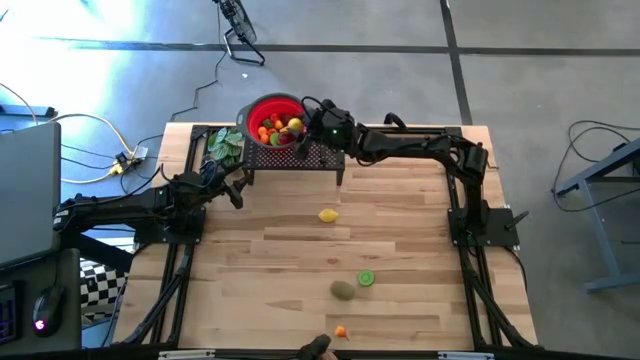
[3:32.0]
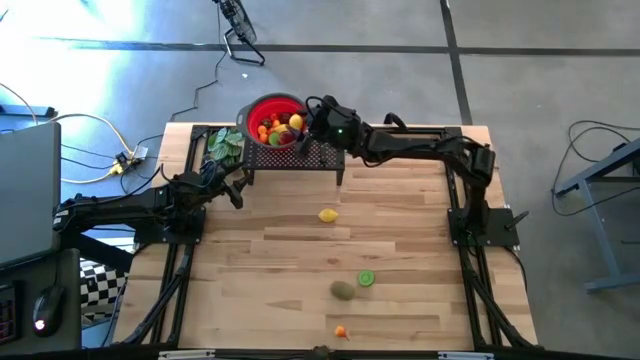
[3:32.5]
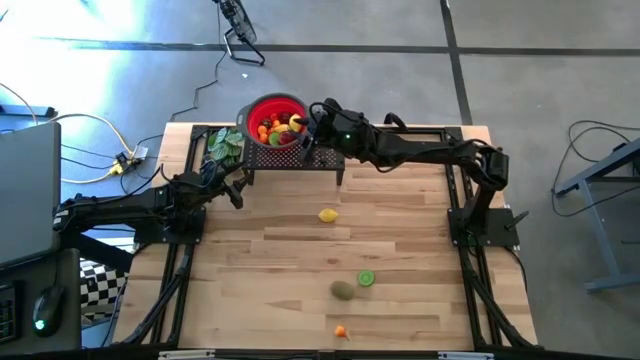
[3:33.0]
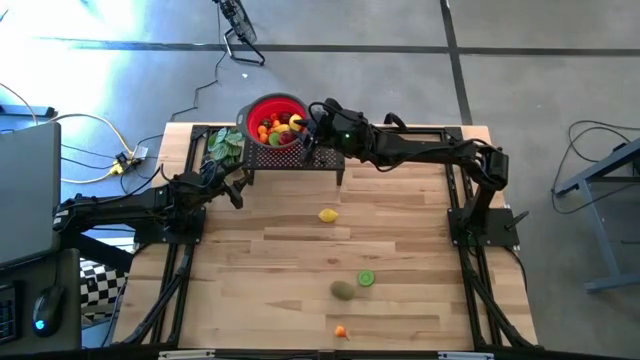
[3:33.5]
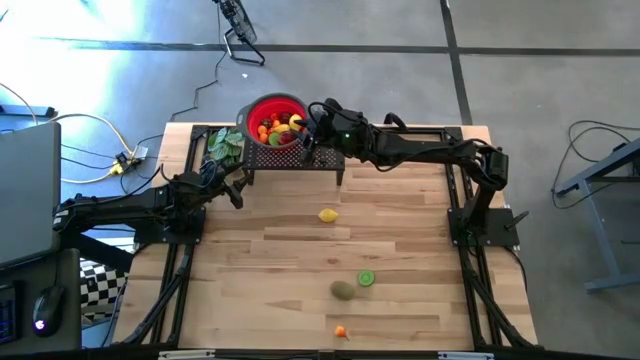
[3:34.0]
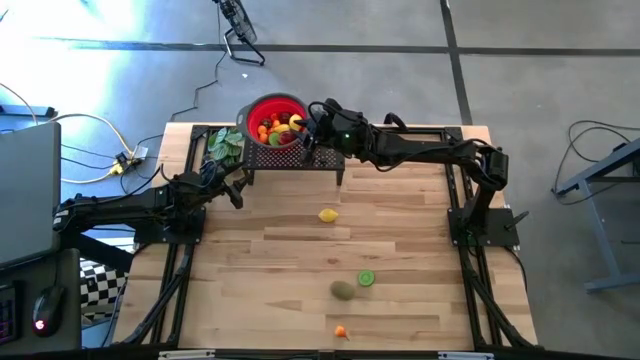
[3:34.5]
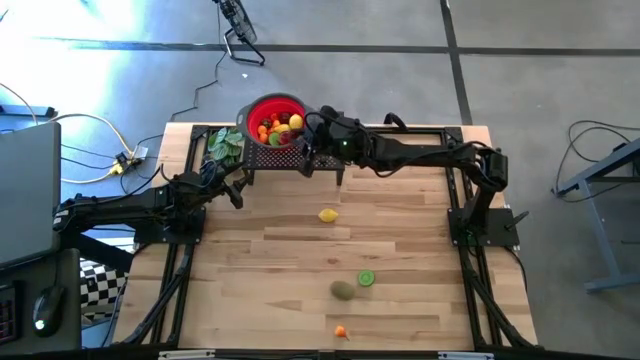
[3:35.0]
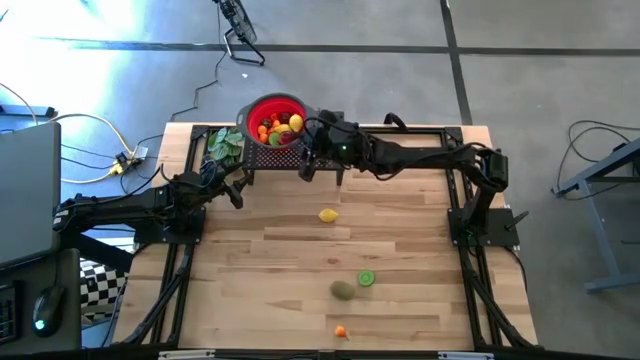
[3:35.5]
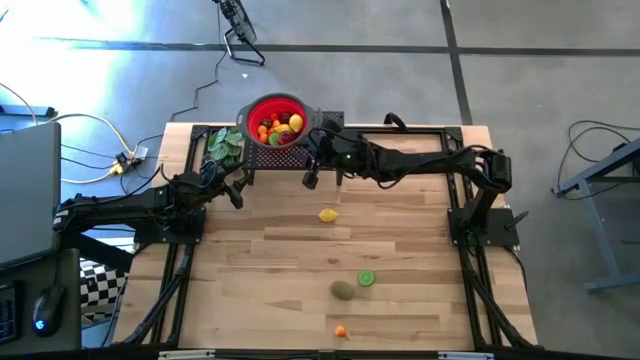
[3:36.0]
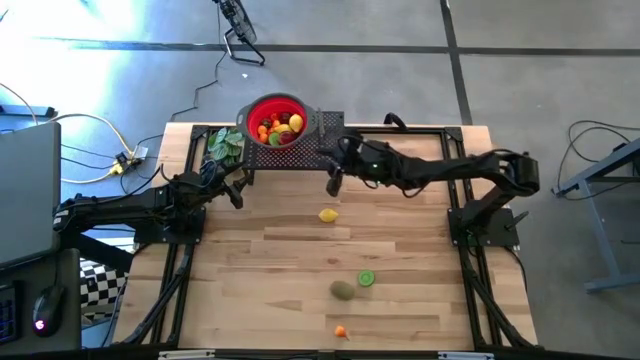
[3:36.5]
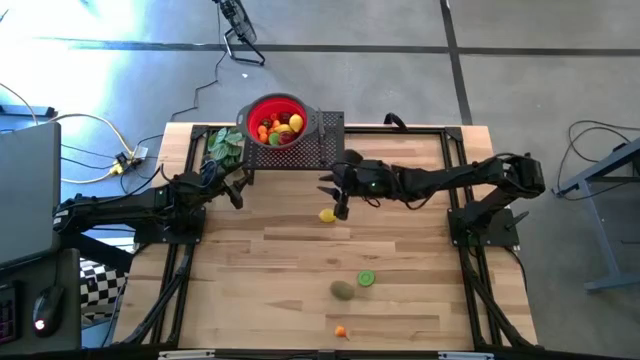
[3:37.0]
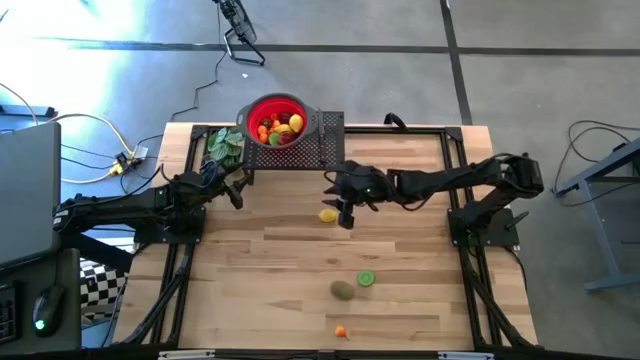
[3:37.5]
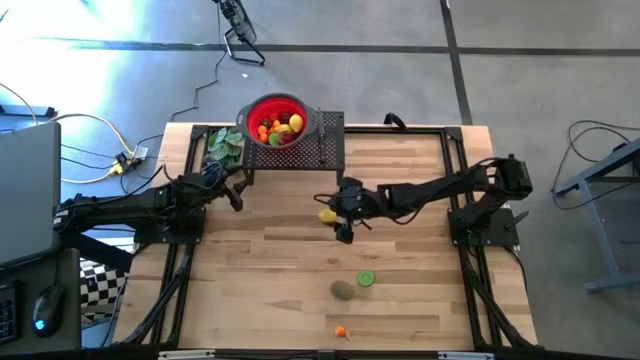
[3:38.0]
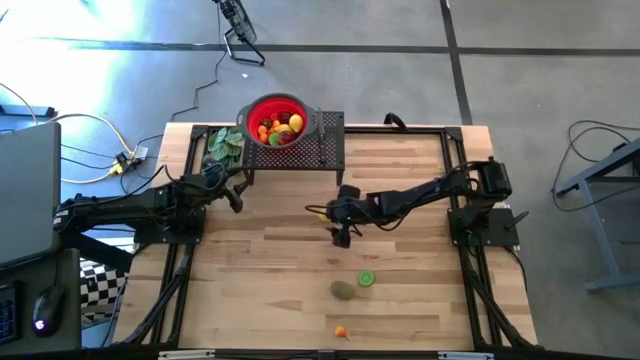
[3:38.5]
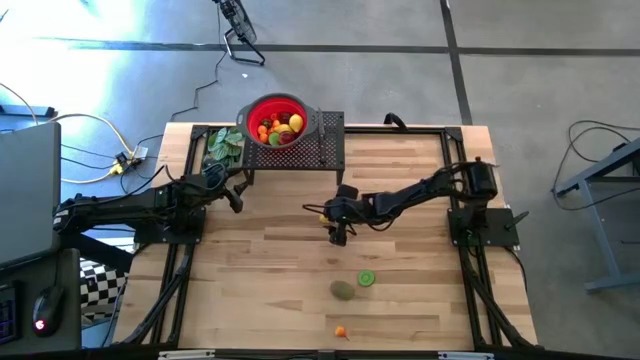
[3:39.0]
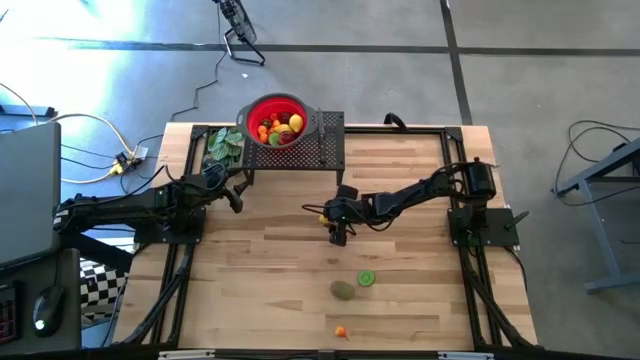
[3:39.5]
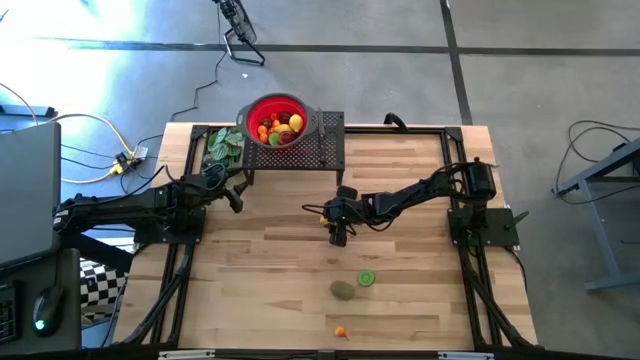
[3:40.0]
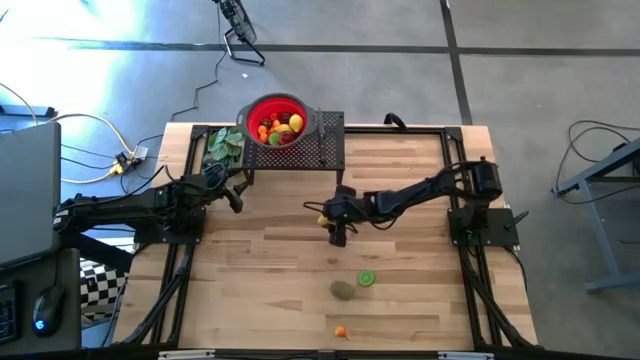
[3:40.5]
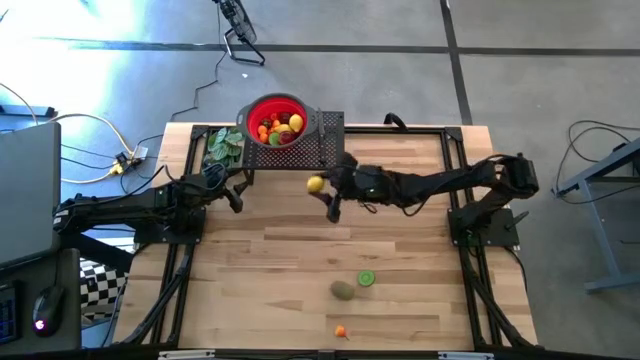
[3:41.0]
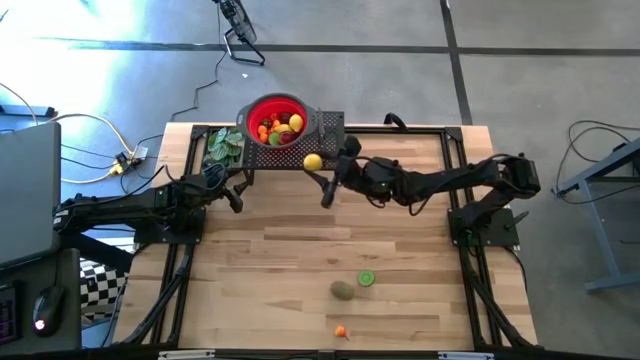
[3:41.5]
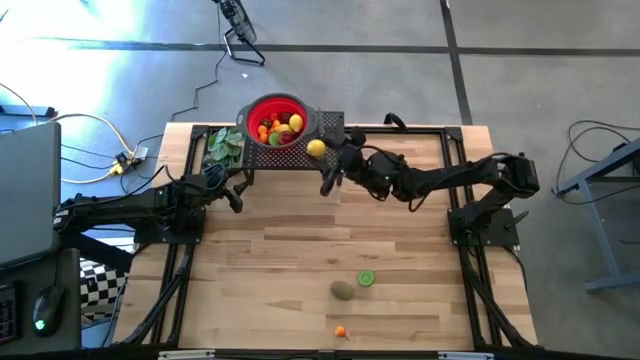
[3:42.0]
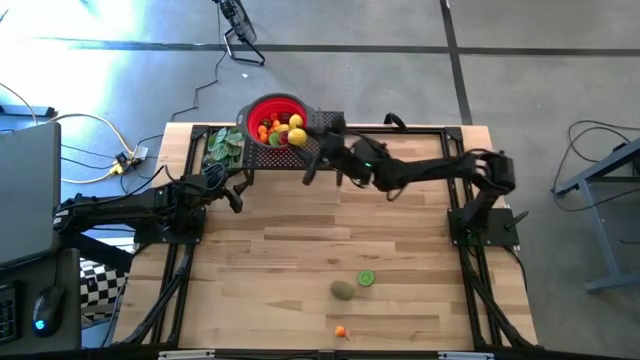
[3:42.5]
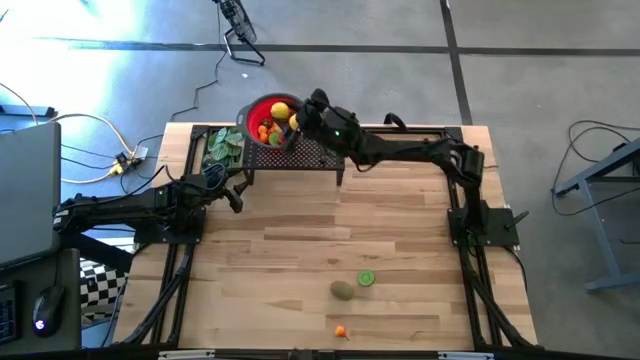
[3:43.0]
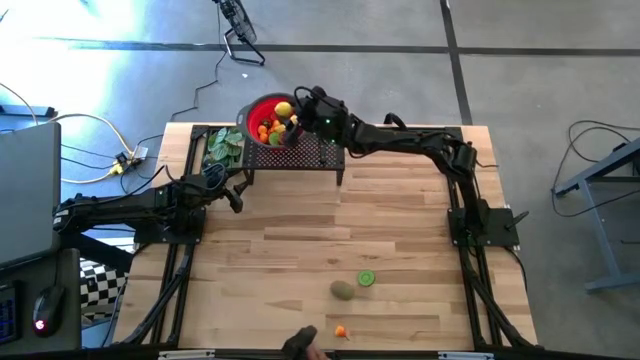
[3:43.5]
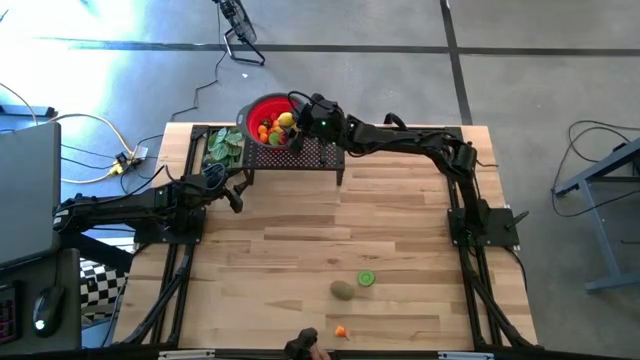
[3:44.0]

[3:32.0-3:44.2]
Task: Pick & Place Fruit
Put the yellow lemon into the red strainer bowl on the shelf

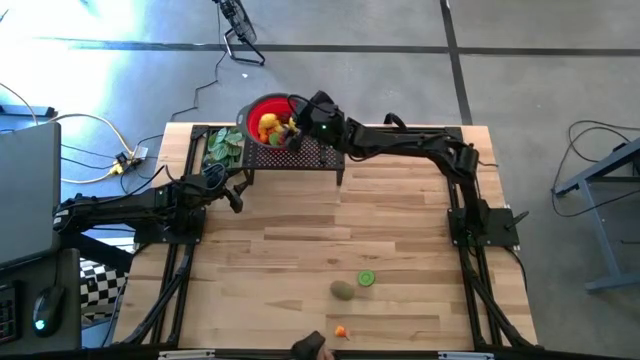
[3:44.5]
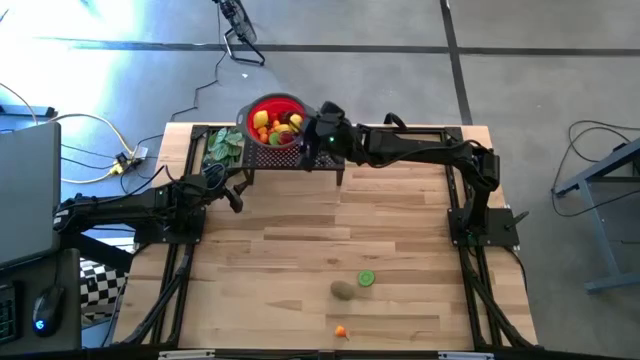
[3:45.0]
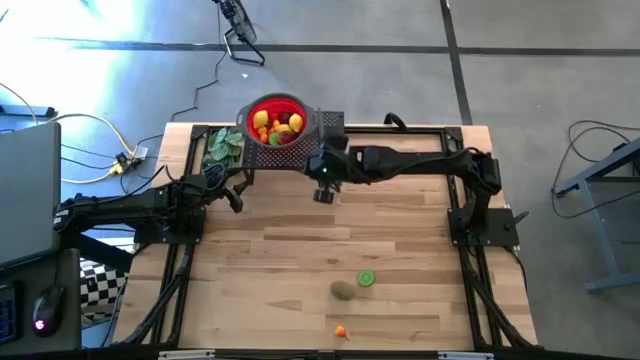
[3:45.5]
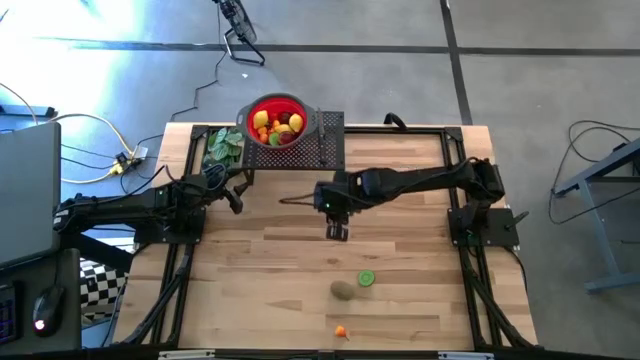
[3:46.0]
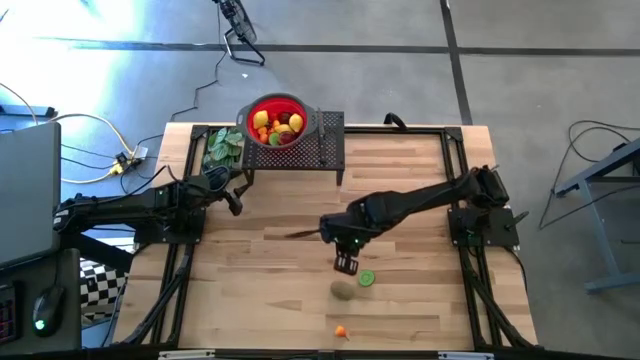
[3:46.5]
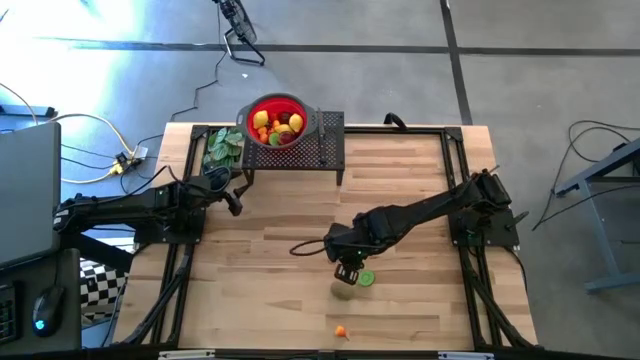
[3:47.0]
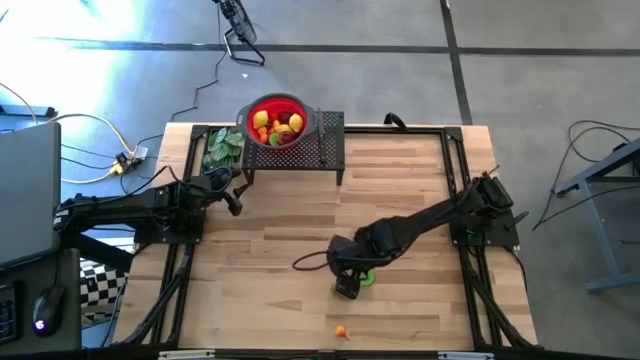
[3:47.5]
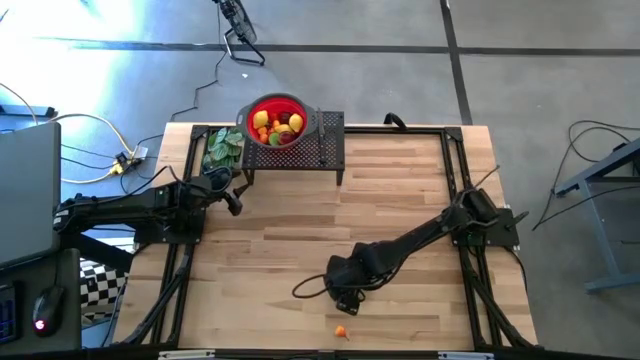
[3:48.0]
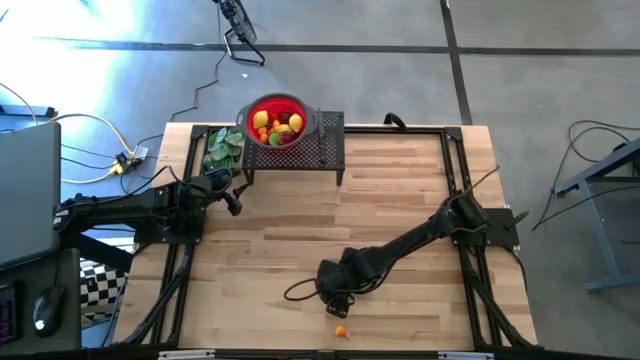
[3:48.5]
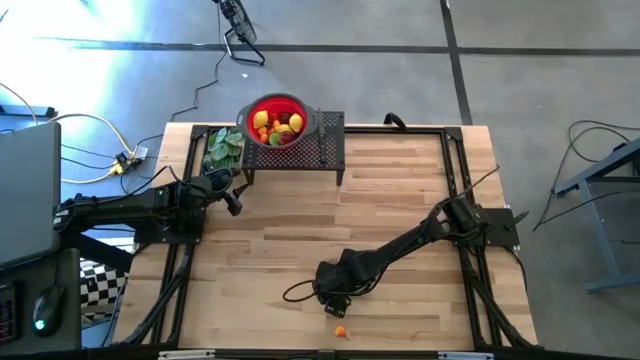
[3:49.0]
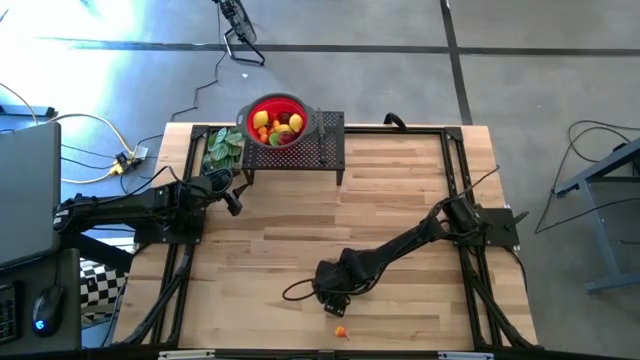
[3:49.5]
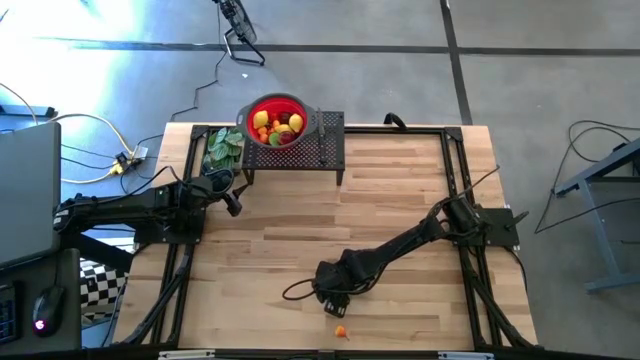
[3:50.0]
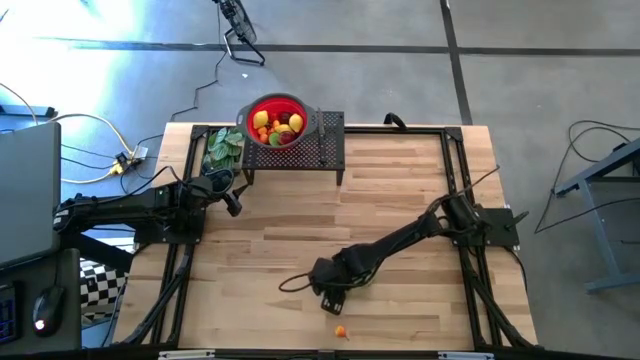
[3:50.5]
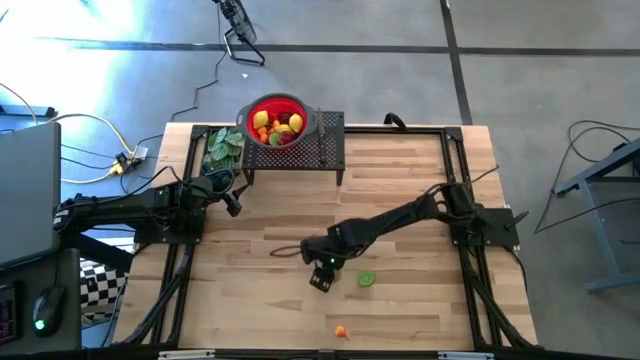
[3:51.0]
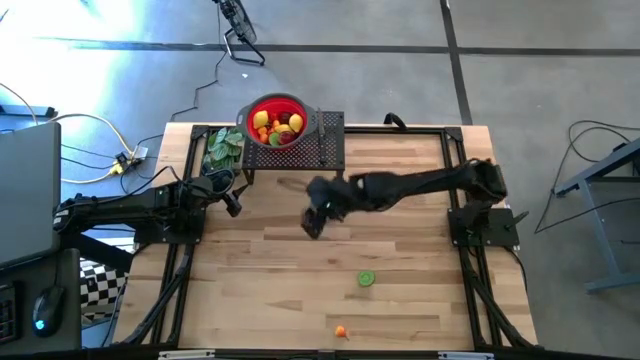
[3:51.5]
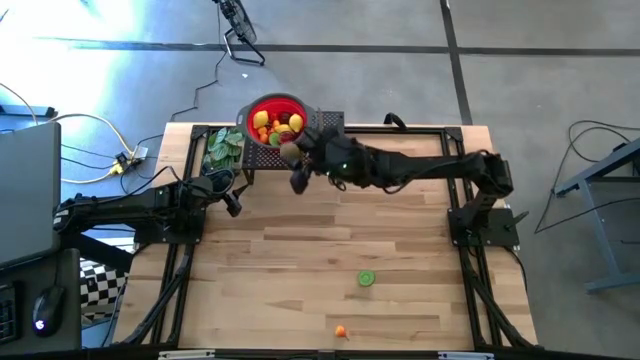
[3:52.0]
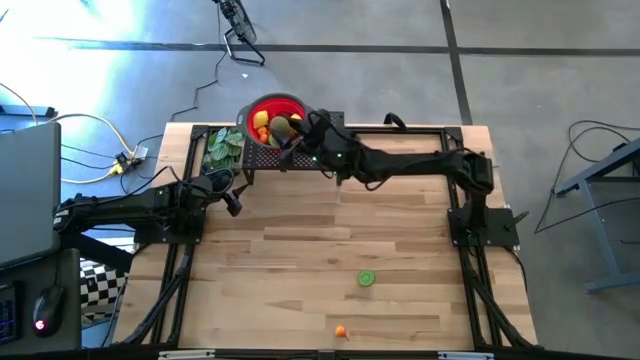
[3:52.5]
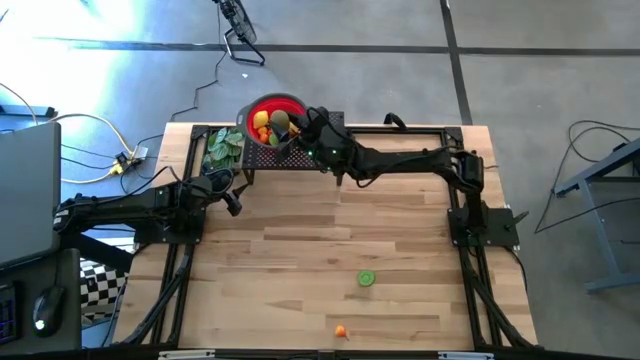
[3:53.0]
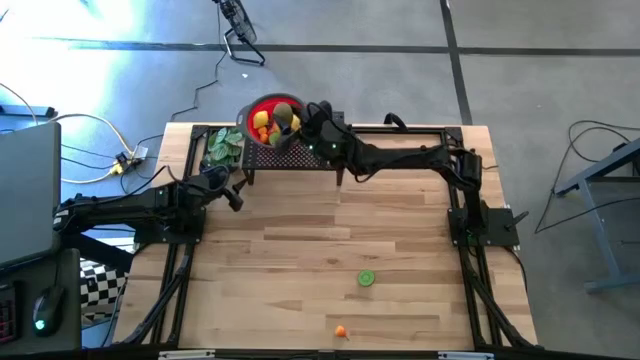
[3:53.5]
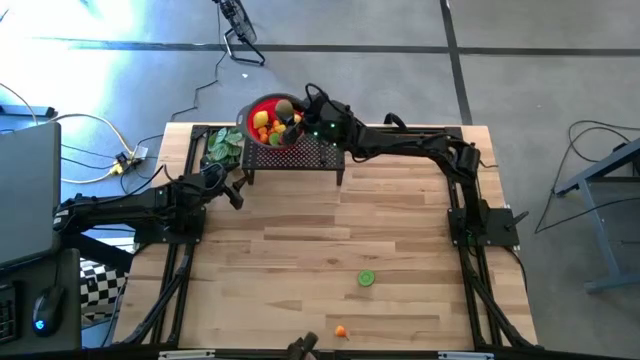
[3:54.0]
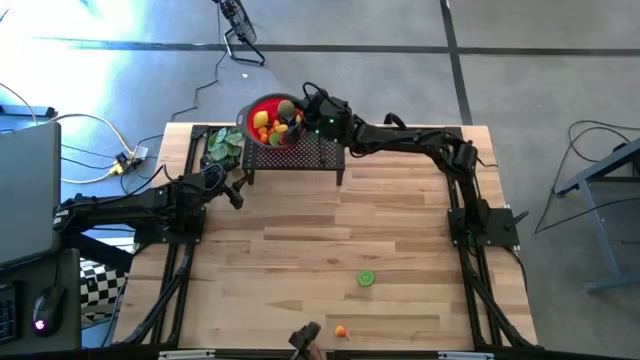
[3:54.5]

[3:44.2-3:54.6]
Put the brown kiwi into the red strainer bowl on the shelf
